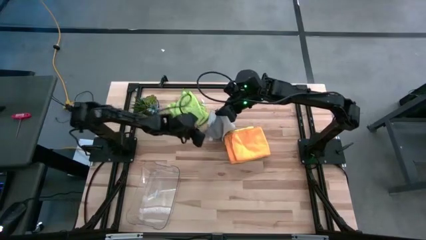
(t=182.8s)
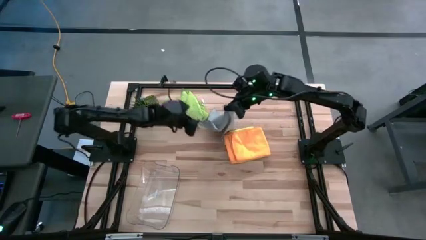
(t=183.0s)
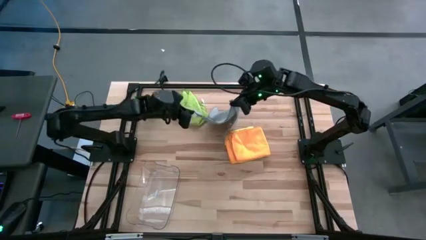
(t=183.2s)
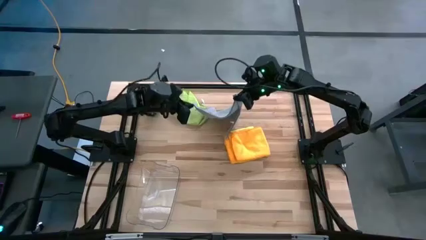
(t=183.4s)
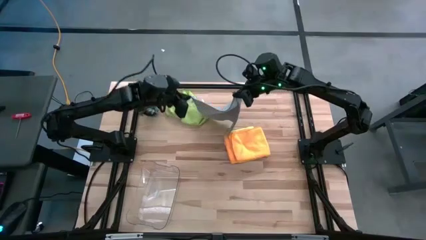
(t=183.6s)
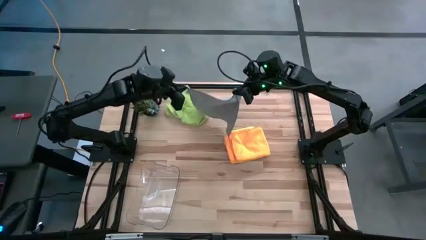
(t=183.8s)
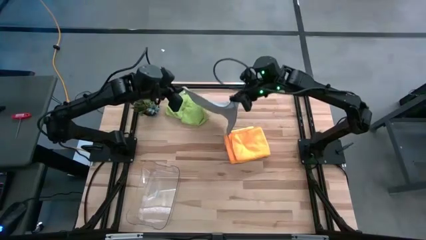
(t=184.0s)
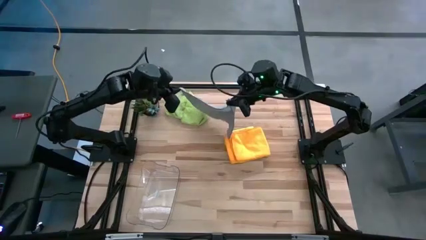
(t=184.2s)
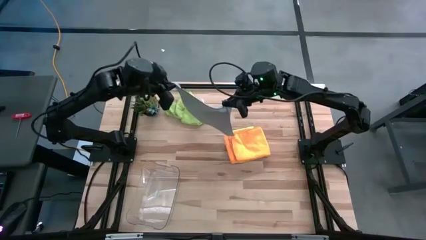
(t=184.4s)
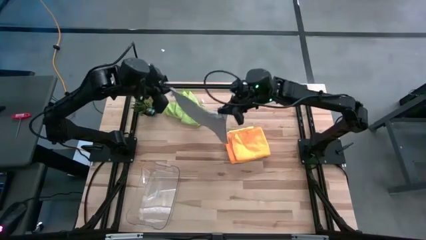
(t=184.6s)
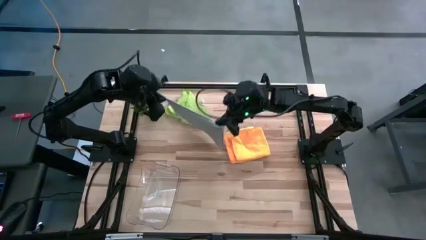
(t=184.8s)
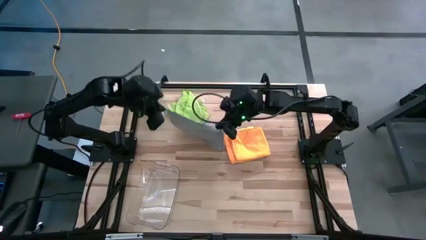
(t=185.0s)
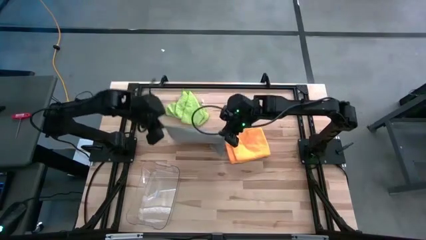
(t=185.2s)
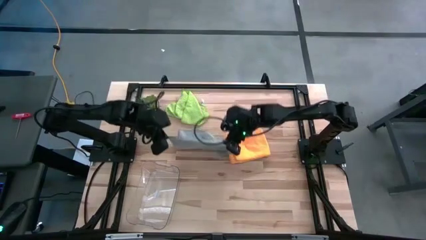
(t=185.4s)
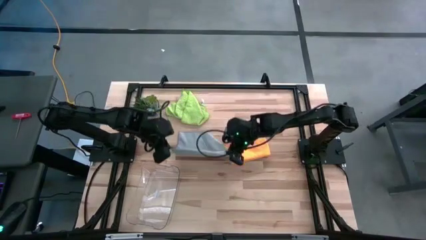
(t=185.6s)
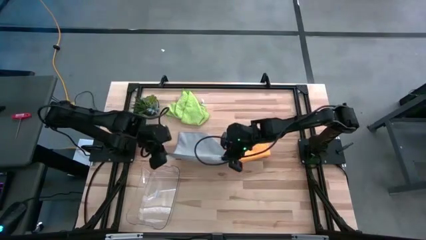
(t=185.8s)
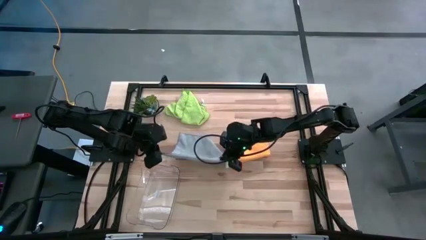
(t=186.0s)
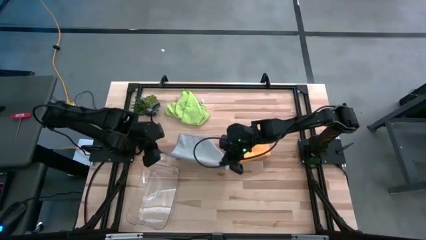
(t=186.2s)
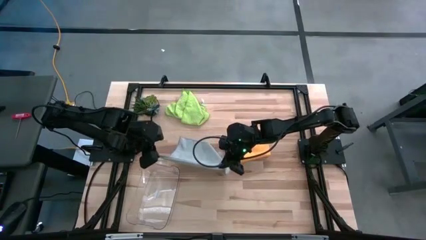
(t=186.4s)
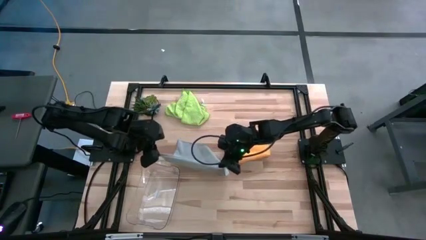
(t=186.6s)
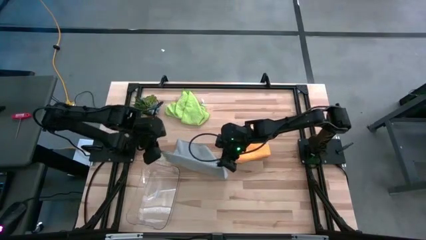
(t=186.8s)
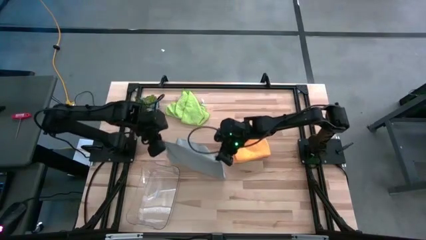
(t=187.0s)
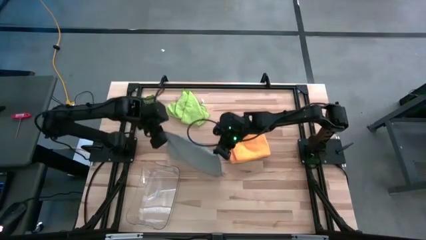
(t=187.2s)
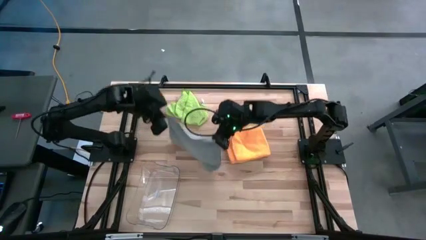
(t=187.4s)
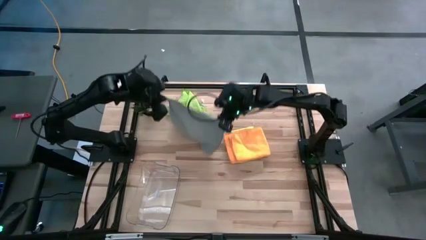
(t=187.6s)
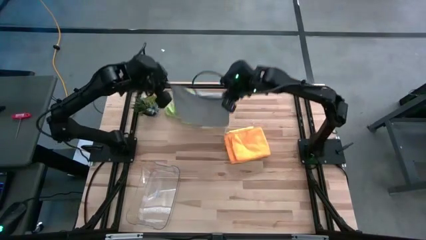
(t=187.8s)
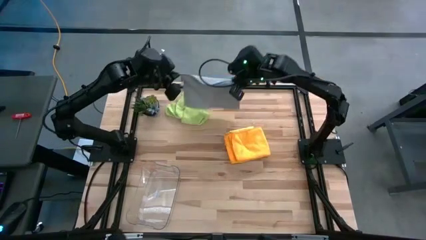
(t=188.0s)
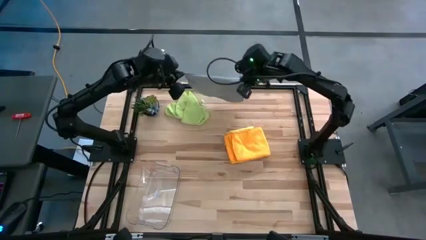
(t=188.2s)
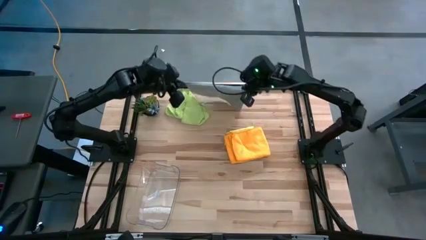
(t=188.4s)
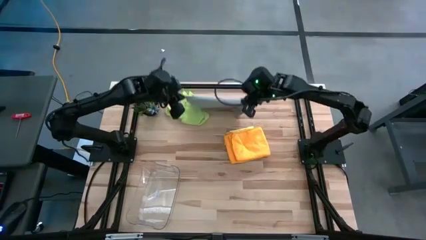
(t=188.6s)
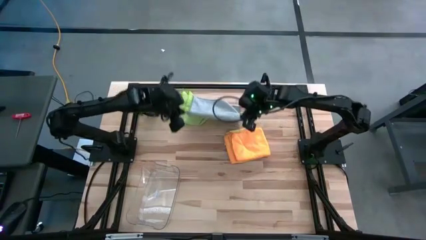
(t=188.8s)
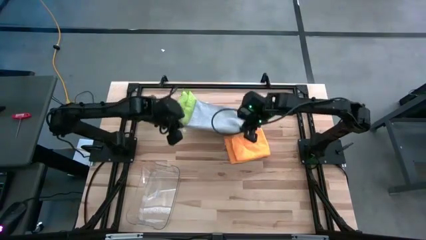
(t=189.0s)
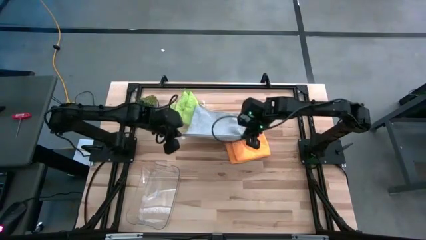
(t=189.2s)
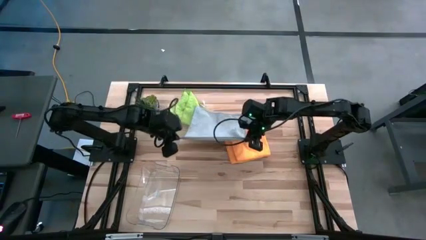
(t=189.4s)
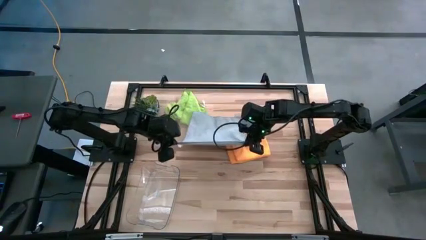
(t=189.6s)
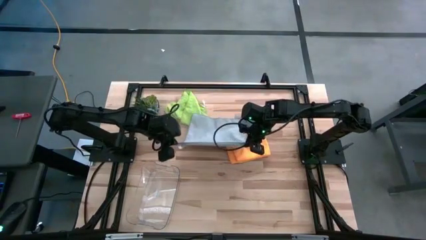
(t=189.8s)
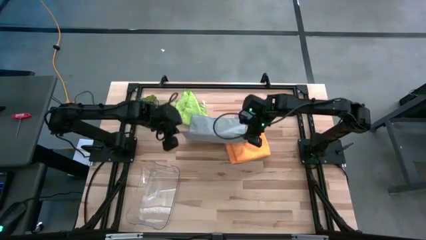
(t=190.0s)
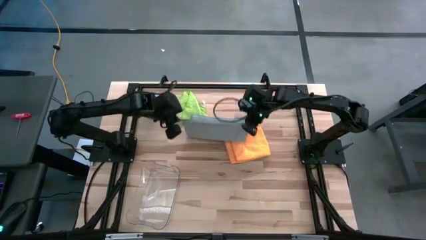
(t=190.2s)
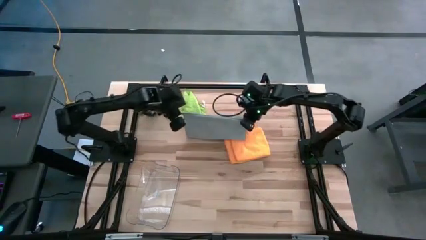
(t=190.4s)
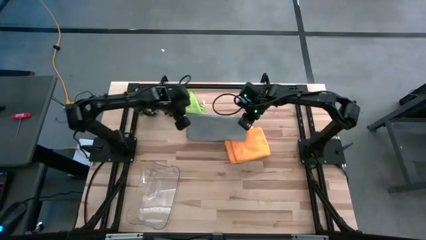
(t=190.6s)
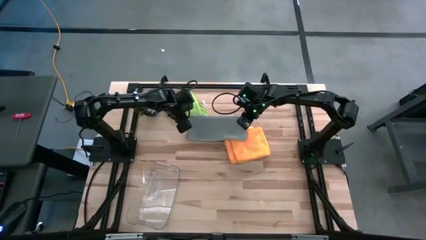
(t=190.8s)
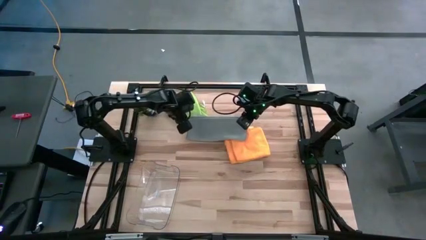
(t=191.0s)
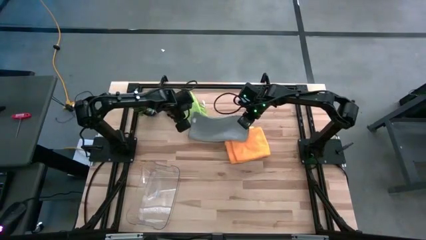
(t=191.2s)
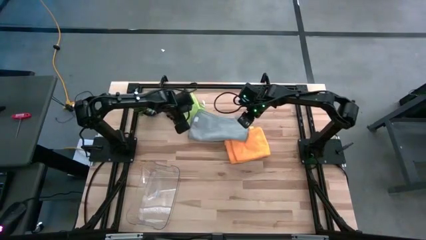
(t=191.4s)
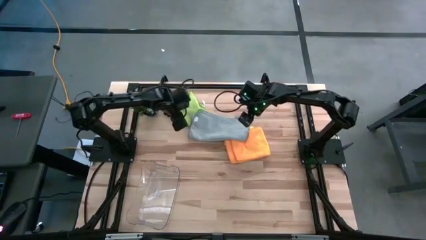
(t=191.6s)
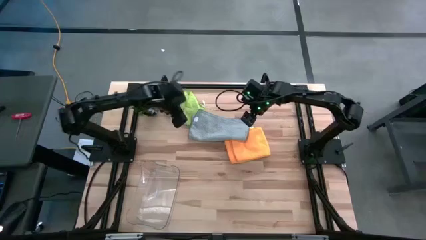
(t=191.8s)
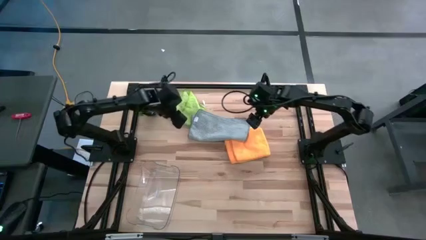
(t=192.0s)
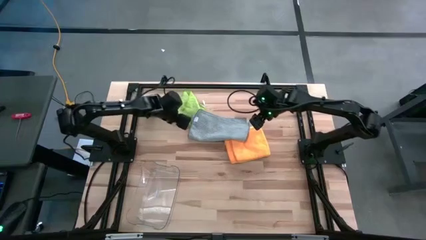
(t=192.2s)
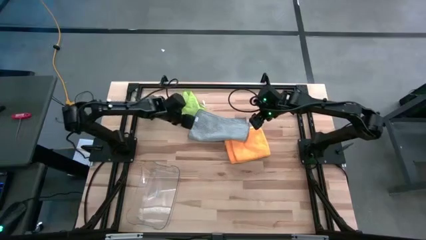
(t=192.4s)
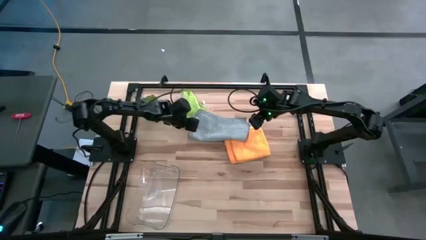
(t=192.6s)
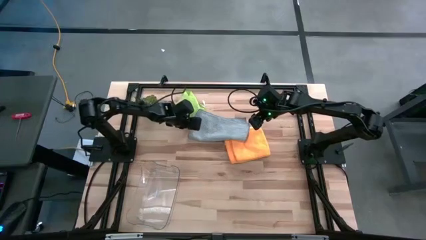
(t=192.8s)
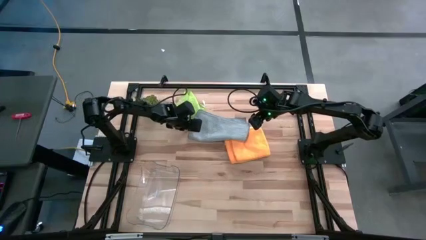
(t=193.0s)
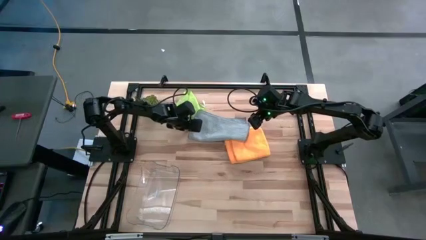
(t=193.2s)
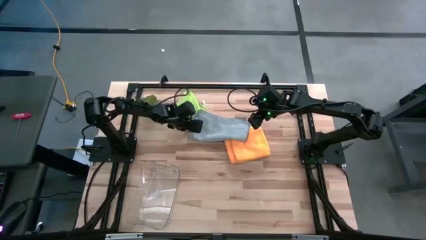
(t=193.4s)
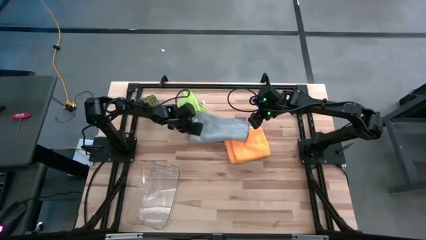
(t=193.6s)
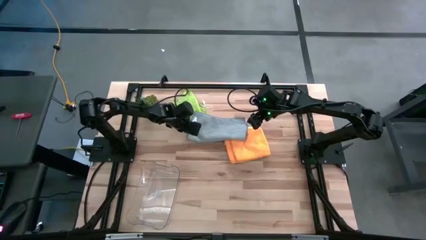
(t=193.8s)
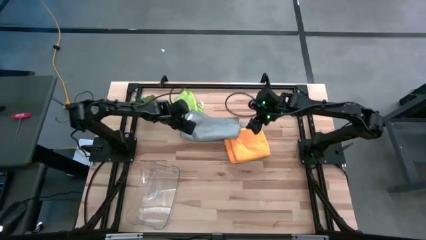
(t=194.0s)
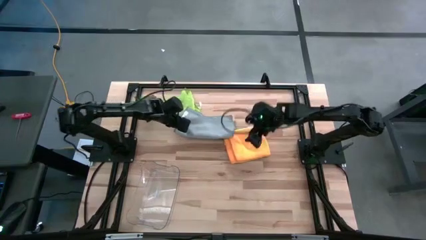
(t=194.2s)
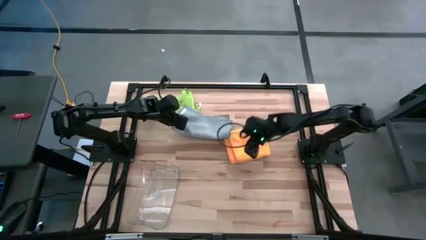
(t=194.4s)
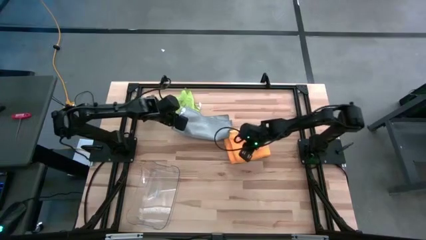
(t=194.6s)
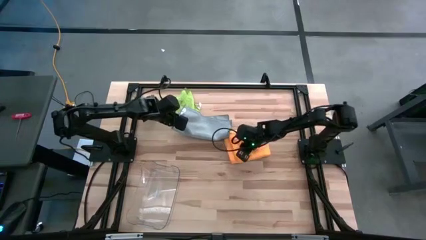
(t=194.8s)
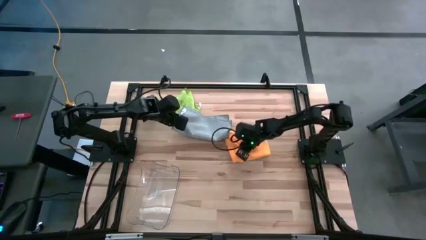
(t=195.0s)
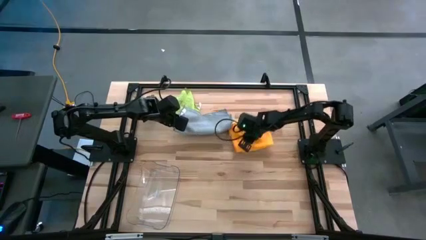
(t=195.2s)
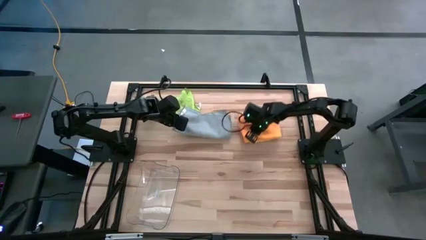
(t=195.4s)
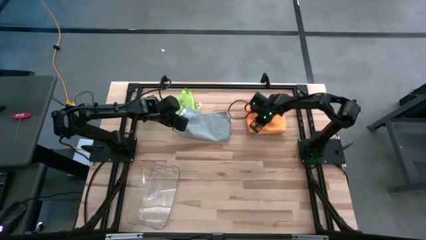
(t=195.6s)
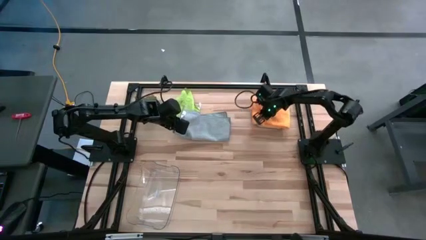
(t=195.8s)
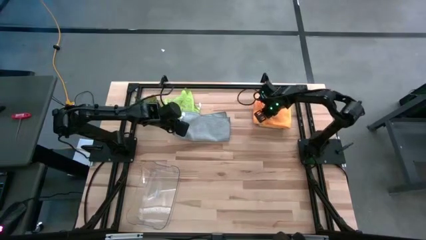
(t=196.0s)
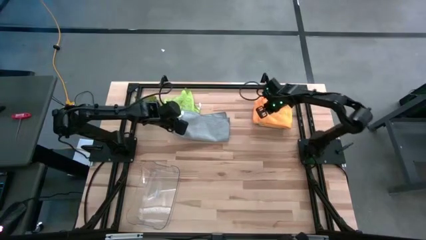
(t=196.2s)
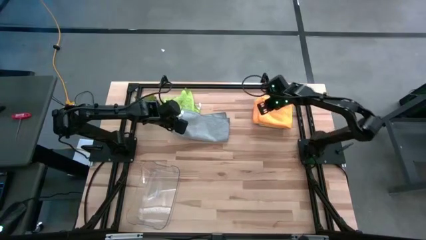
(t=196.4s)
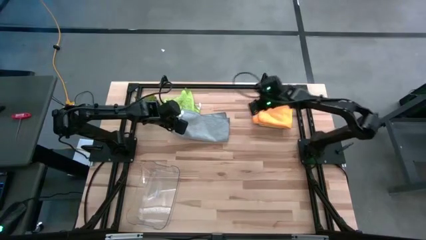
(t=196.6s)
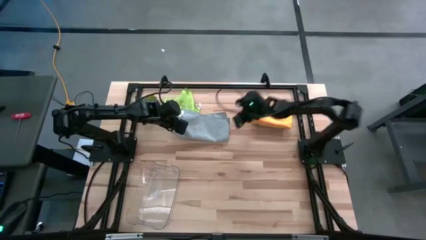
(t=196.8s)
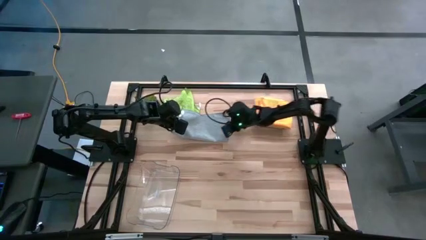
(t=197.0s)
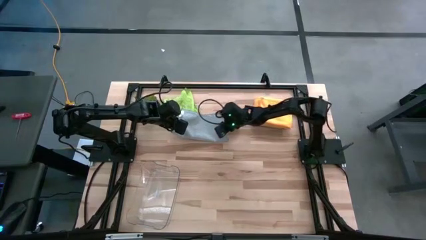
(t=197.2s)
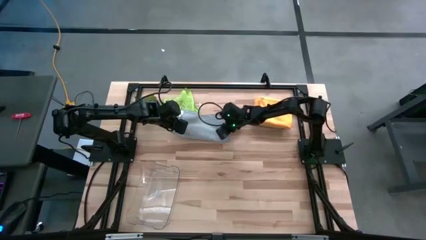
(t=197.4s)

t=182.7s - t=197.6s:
Task: Fold microfiber towels
Fold the light blue towel

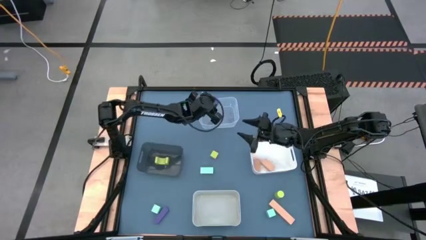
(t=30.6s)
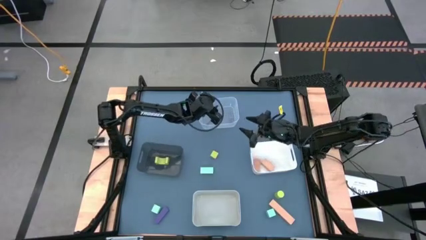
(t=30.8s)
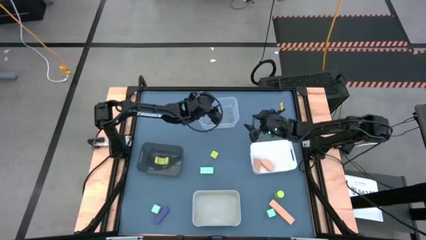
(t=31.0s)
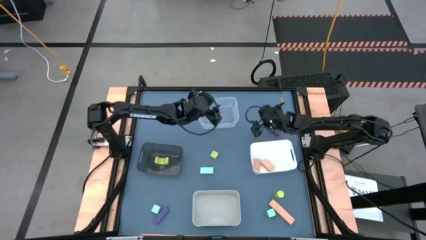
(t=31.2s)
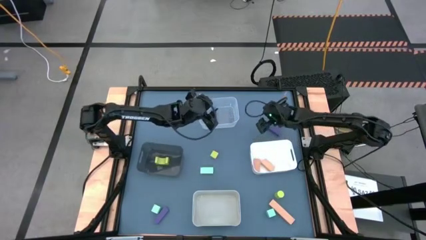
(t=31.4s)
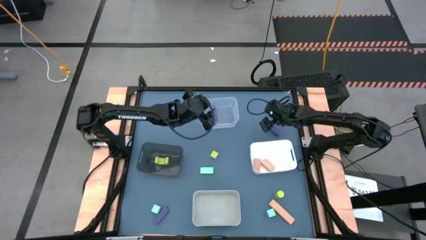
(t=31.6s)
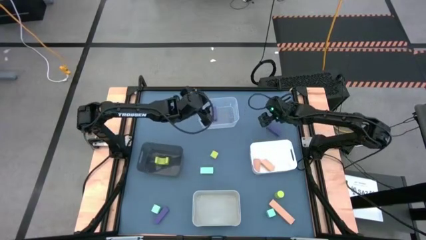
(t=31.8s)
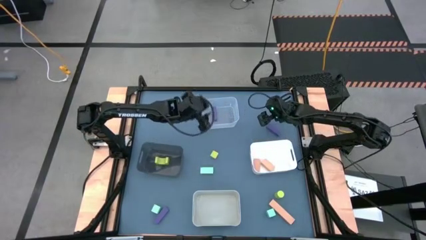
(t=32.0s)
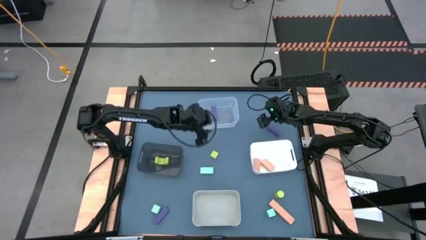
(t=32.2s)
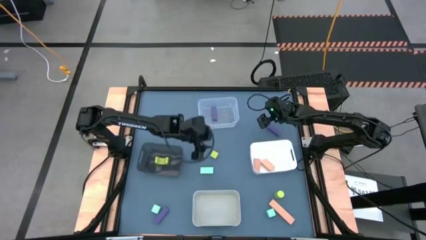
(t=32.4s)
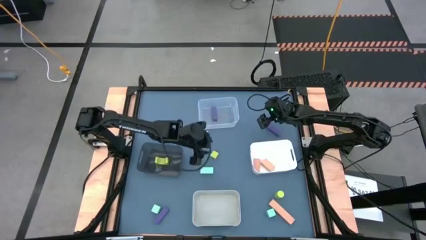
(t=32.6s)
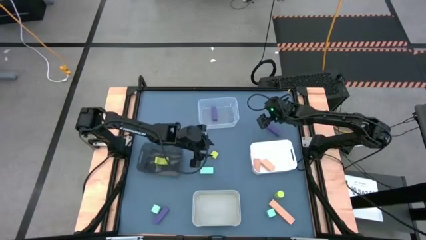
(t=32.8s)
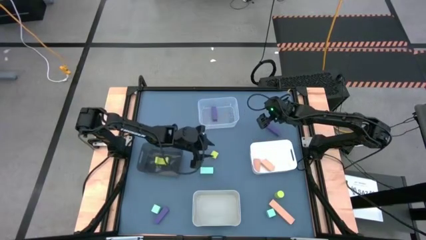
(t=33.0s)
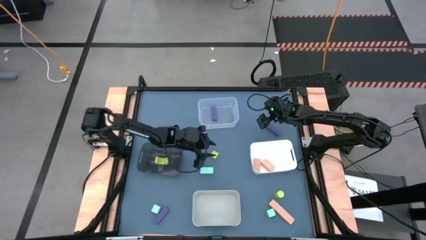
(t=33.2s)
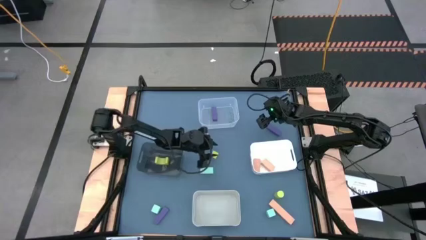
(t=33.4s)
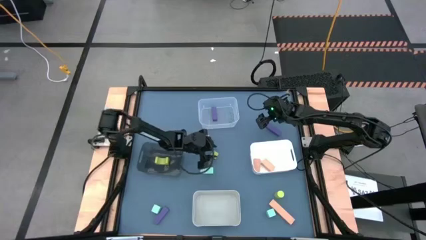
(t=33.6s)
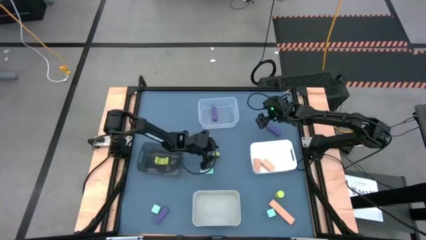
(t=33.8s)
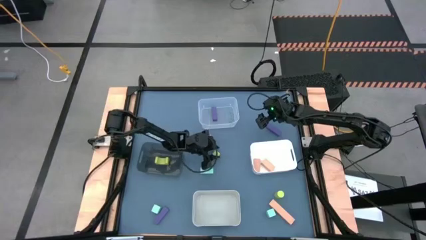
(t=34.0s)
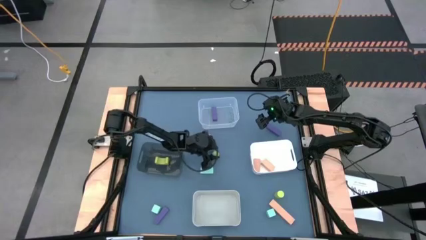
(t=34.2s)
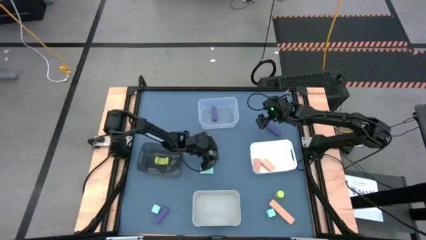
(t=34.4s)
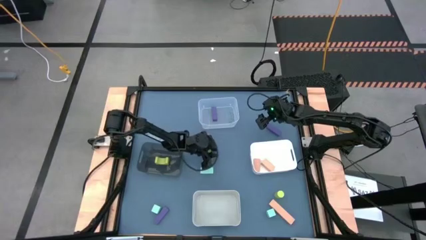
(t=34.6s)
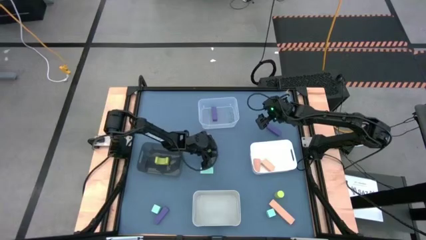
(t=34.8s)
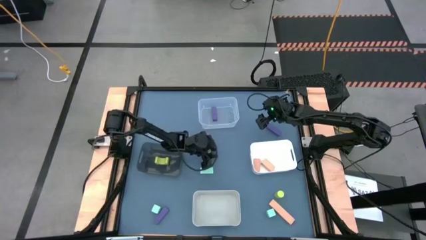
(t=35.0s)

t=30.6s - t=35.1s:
Task: Sort & place blocks by color
Put the top green block into the black bin
